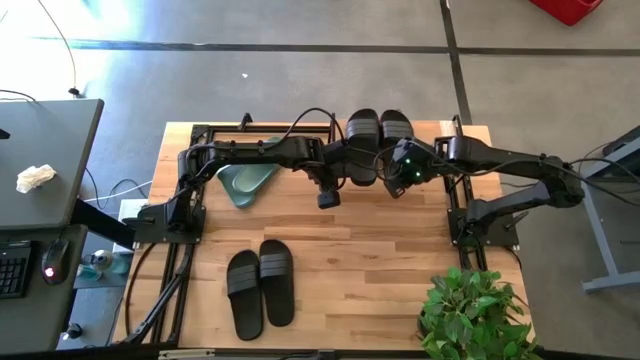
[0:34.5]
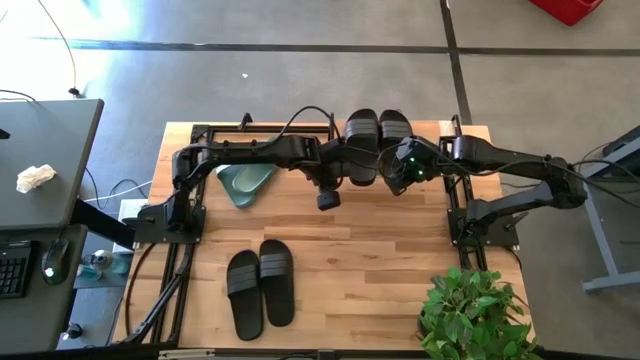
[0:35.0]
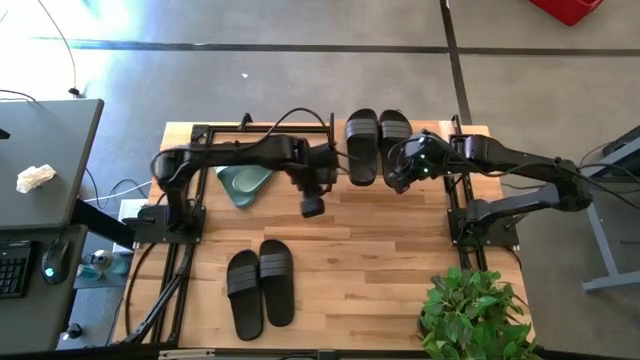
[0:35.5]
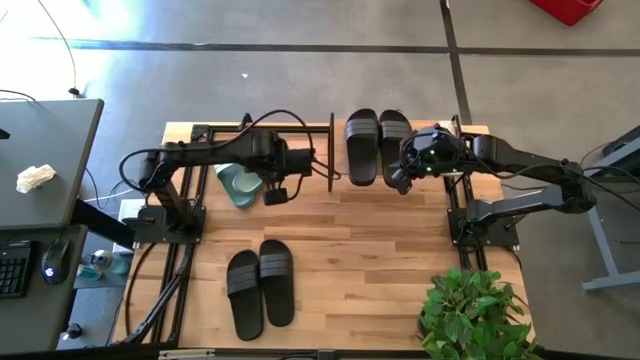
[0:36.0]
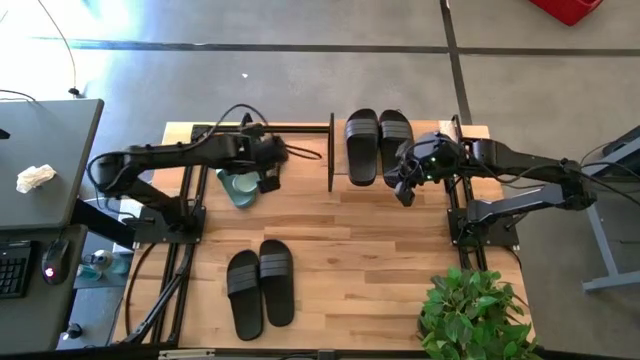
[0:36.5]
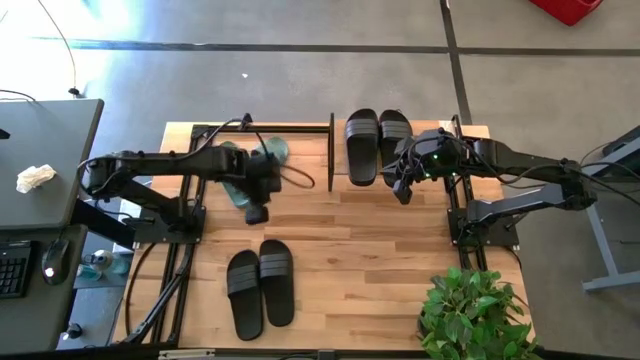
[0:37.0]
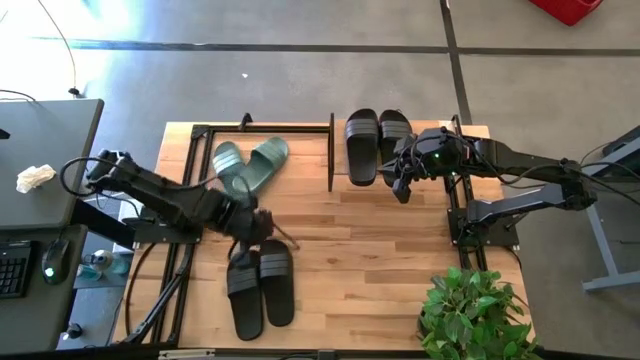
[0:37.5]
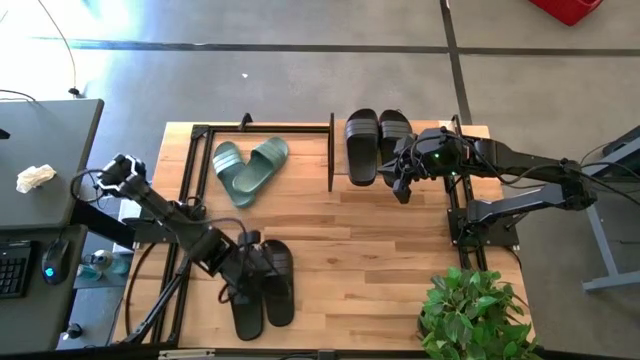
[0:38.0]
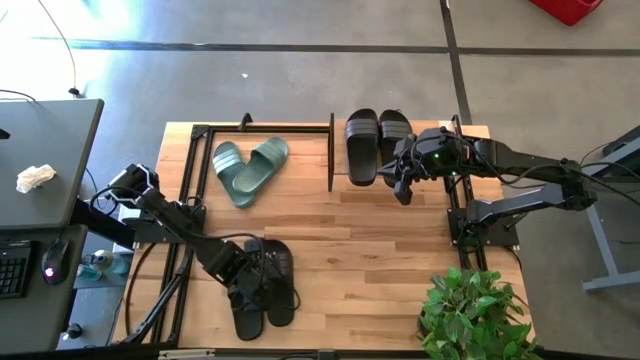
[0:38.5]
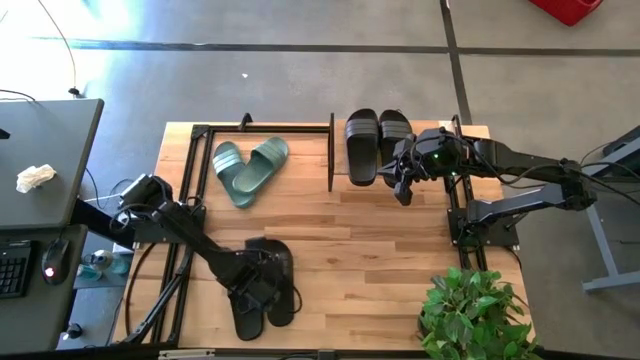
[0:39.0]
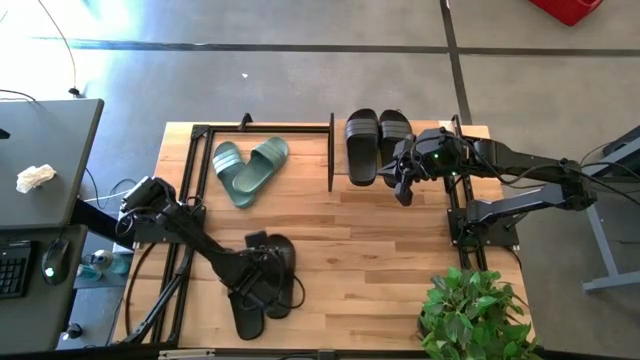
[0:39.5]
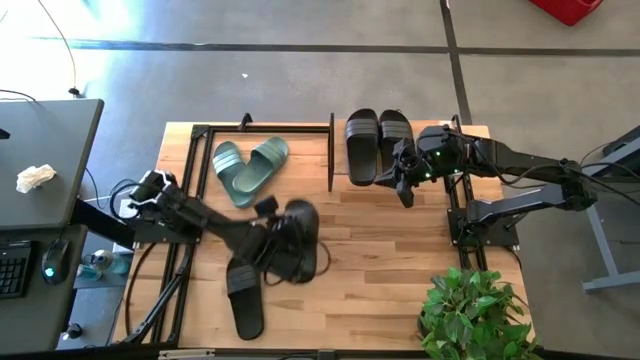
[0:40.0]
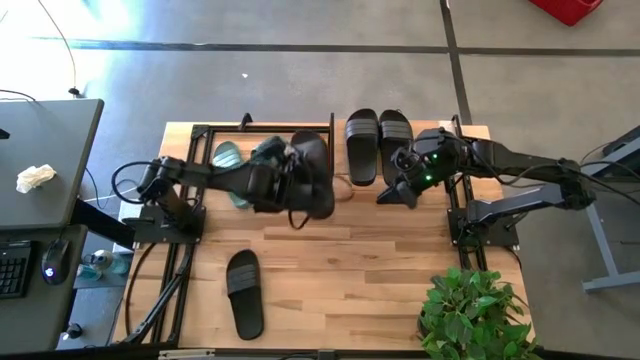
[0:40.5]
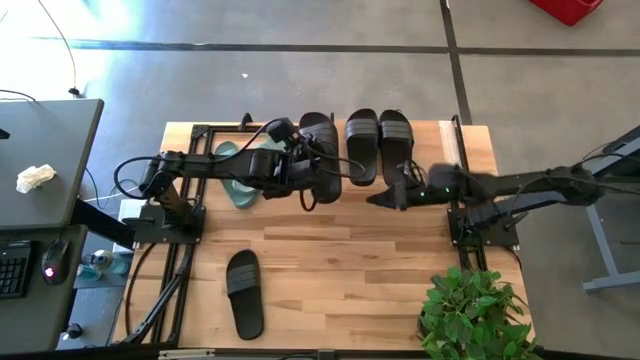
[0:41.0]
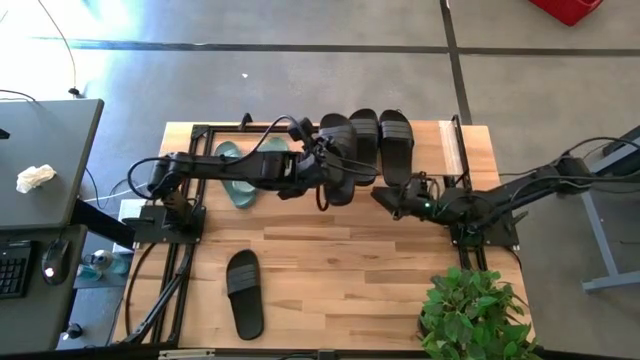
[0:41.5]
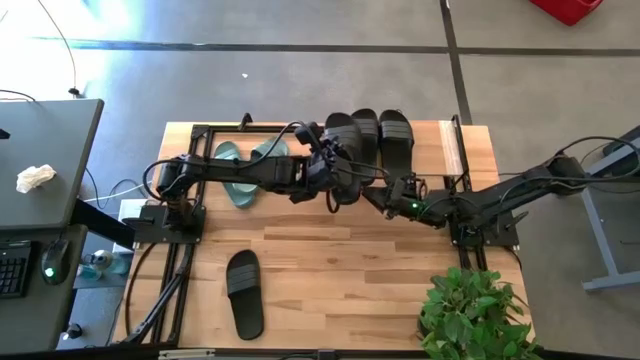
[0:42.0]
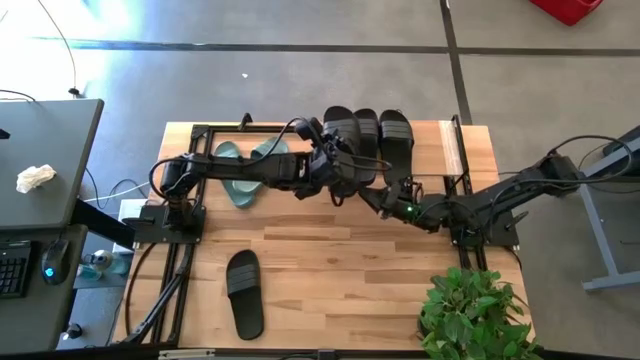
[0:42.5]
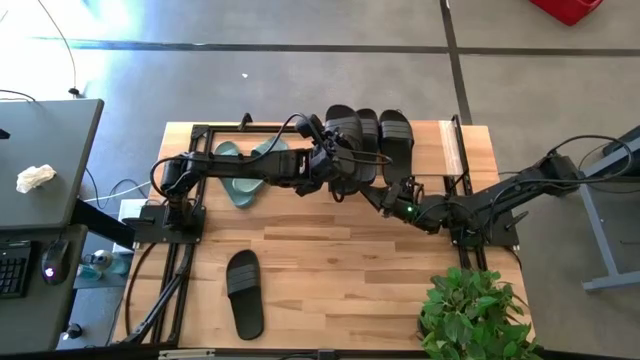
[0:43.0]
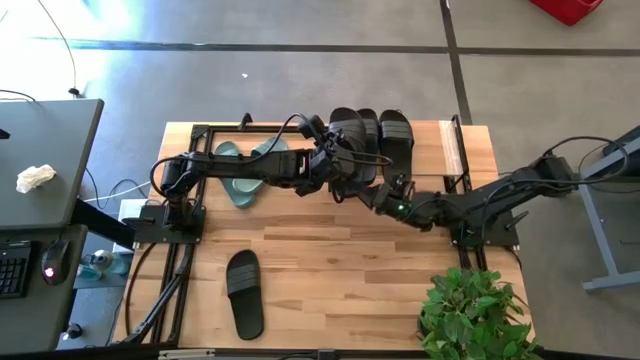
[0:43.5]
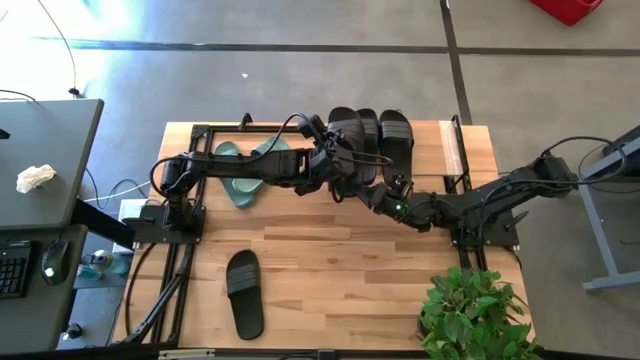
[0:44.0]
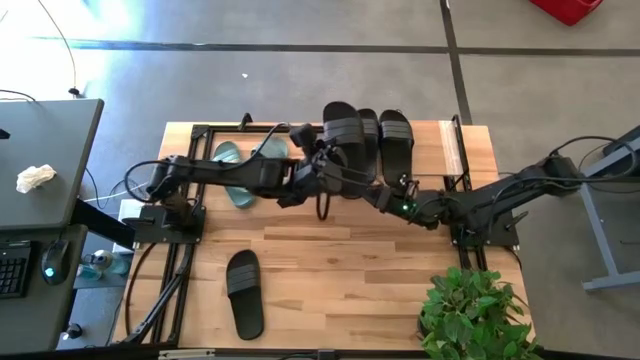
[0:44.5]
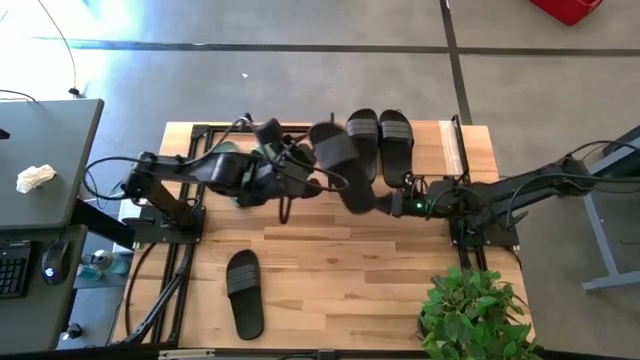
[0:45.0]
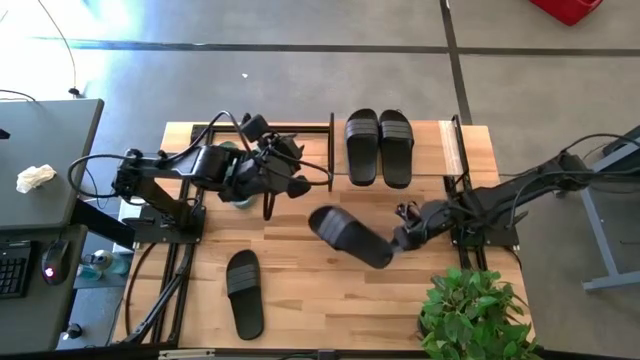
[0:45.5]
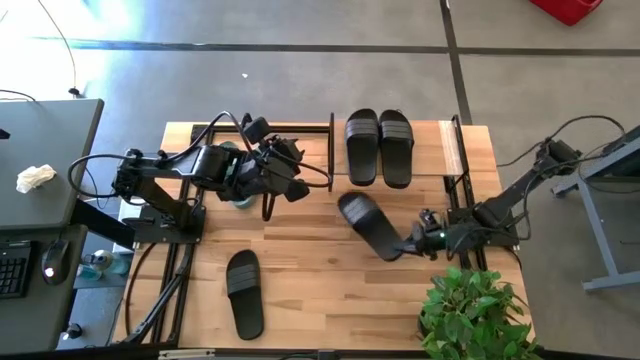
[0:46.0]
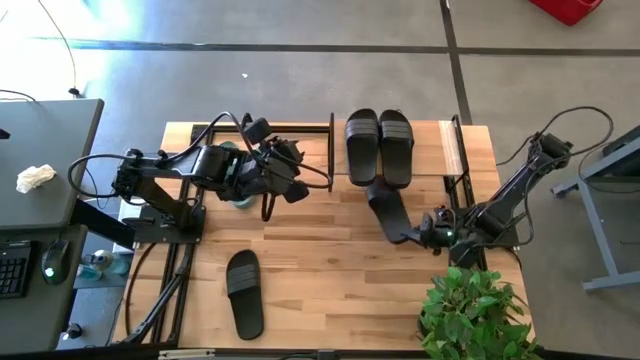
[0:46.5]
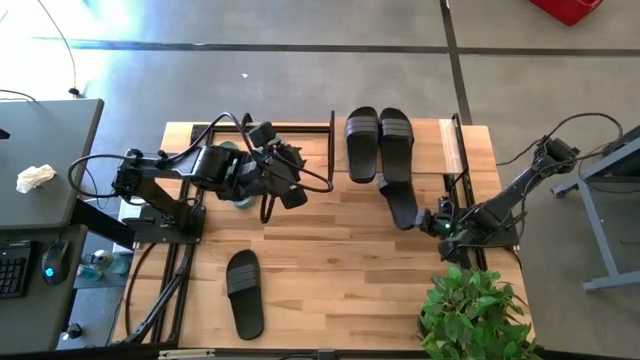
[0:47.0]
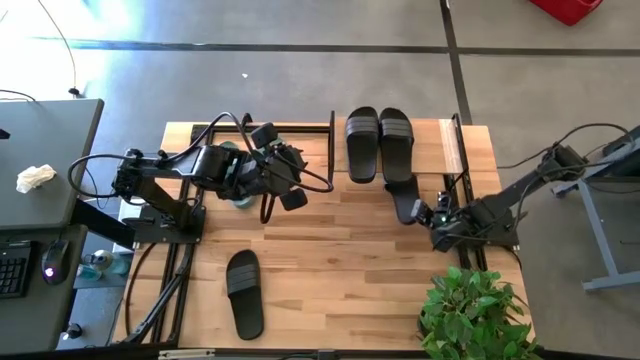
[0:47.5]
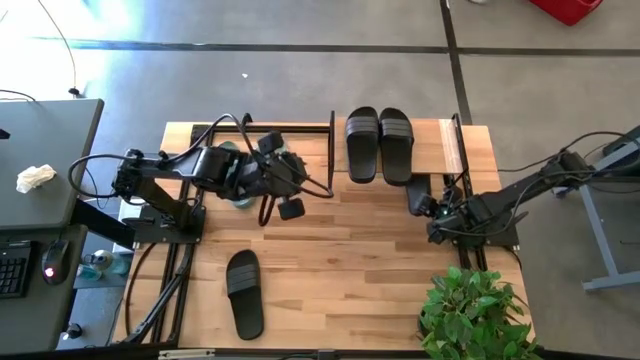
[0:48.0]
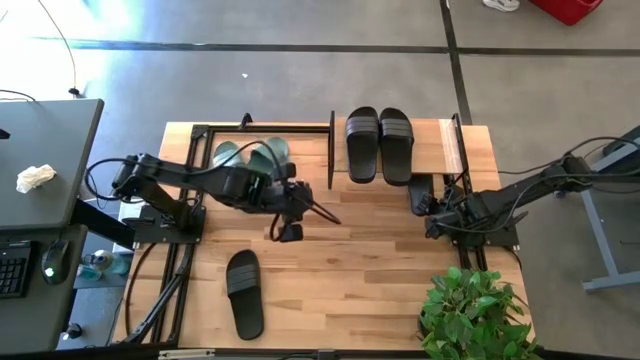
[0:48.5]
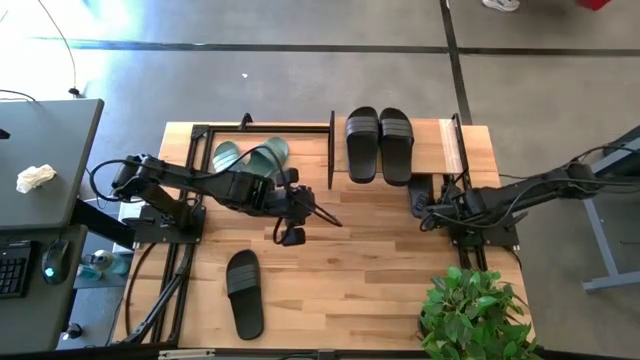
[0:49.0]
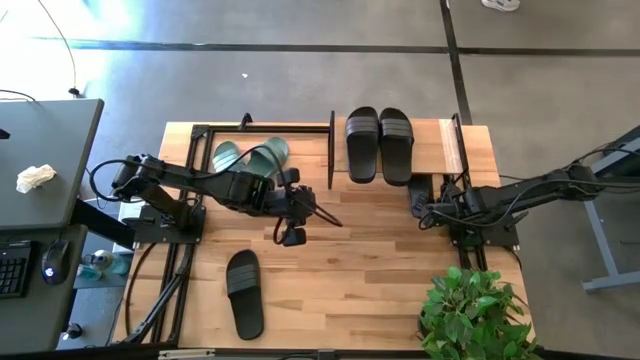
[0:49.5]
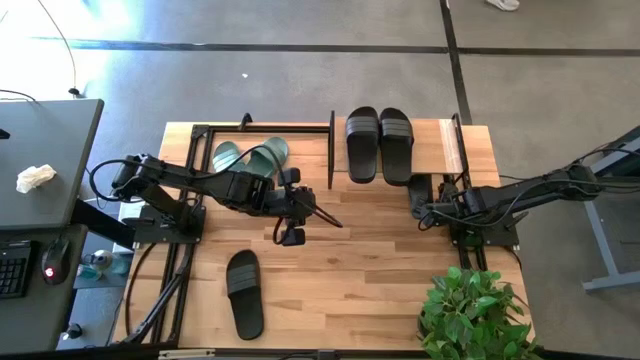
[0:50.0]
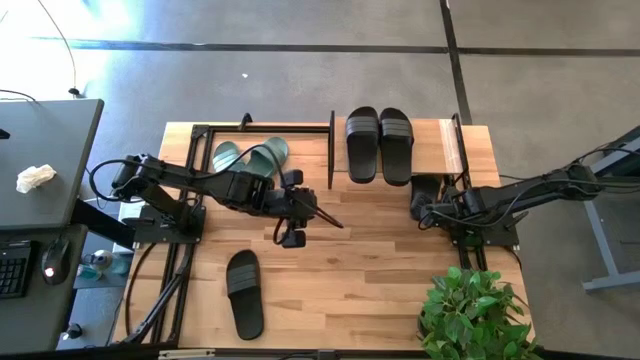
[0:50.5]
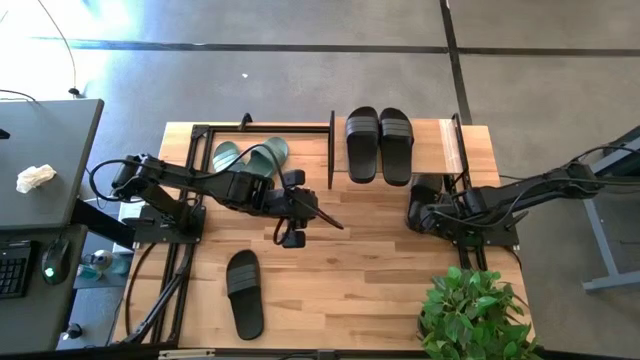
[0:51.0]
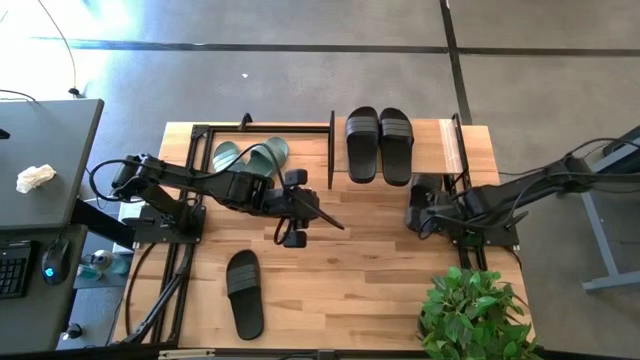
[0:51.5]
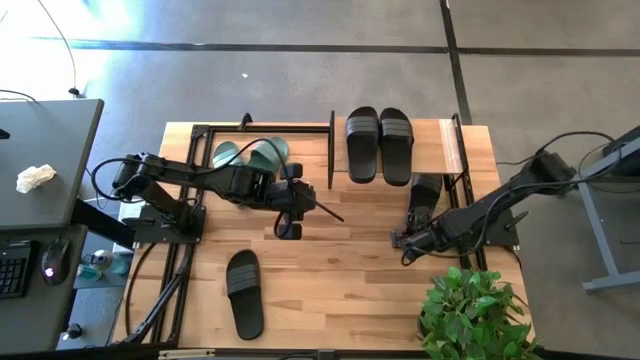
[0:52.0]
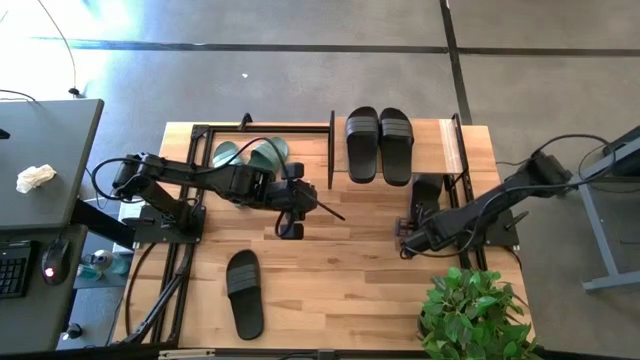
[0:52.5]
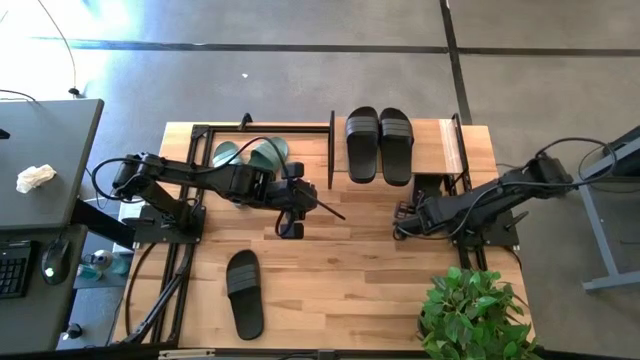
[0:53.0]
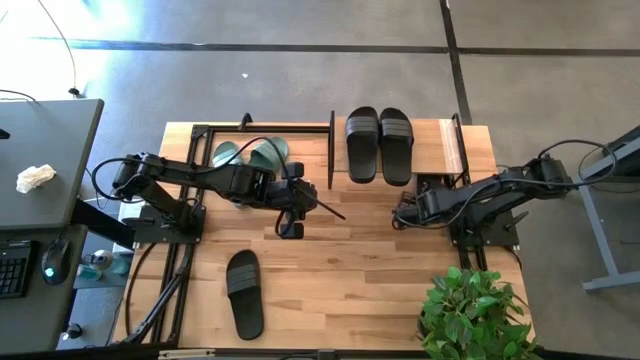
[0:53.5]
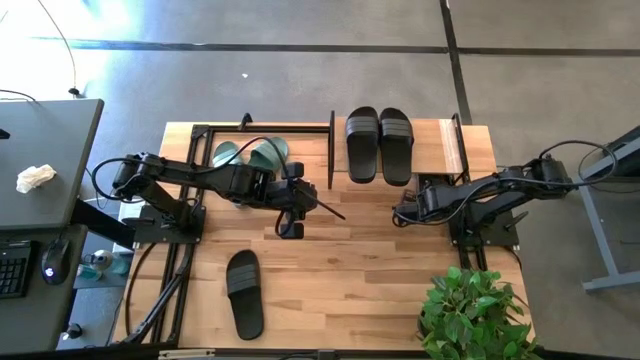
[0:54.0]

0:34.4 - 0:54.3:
Task: Pick and place slides into the shelf
Put the black slipper under the shelf
